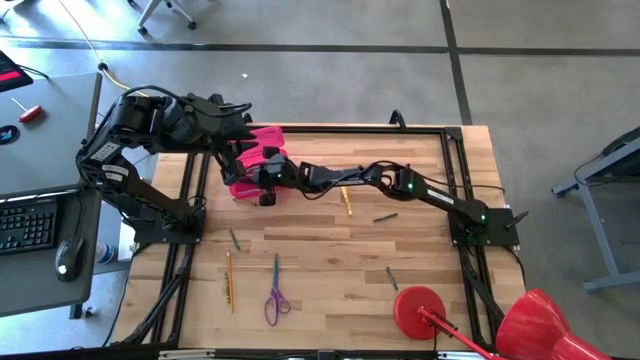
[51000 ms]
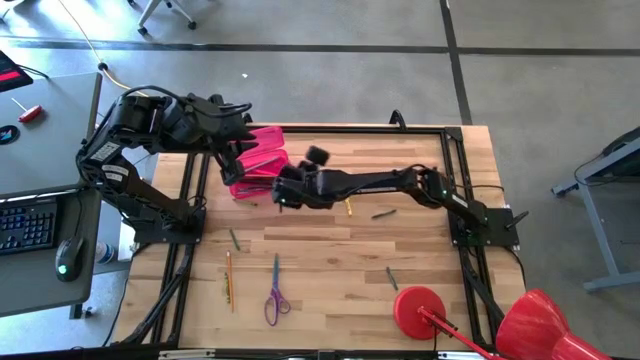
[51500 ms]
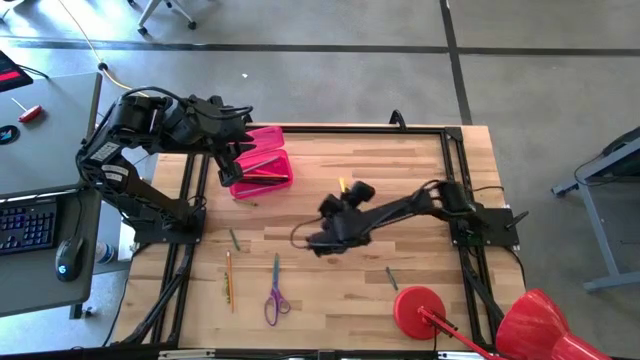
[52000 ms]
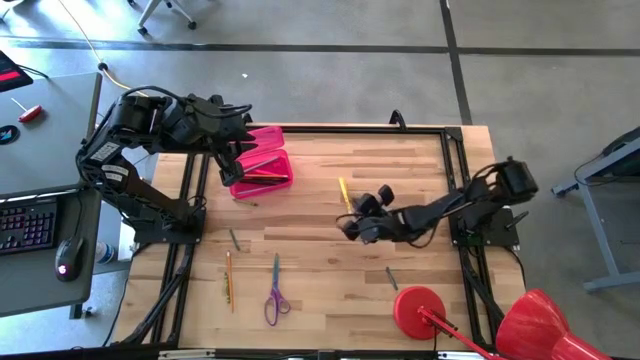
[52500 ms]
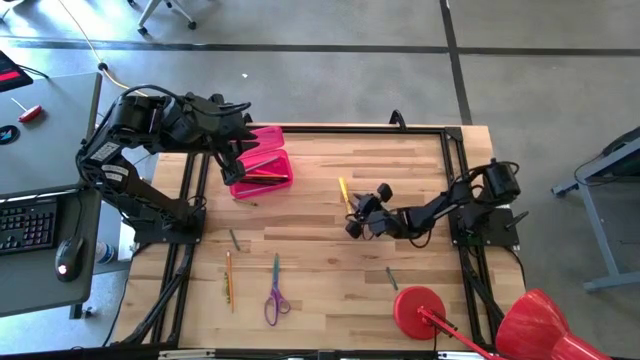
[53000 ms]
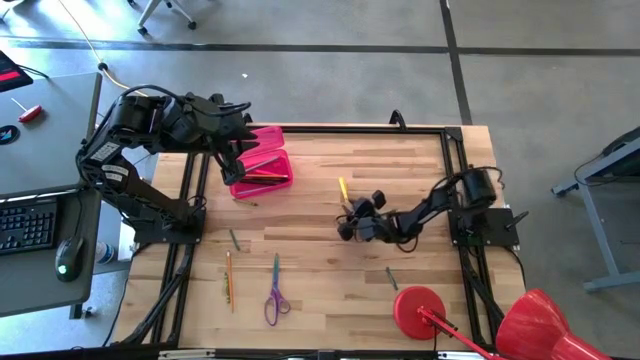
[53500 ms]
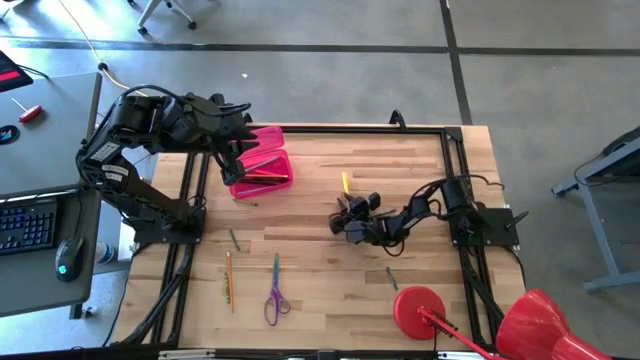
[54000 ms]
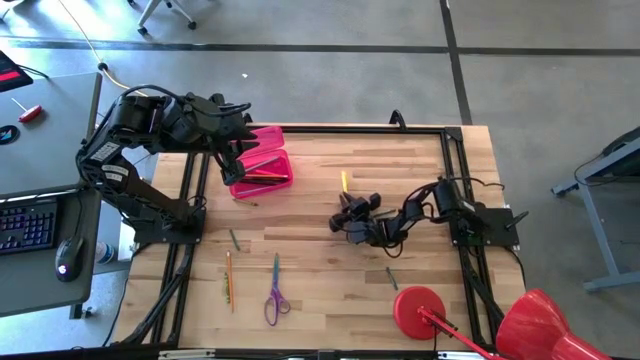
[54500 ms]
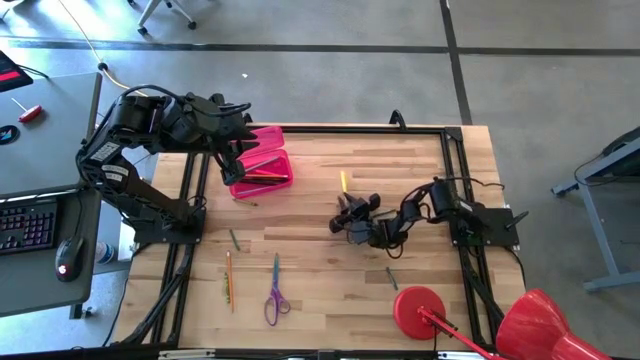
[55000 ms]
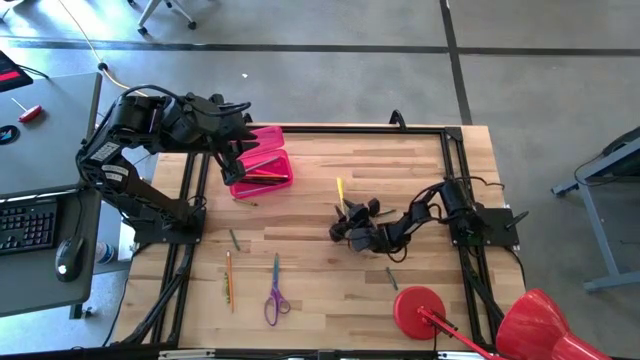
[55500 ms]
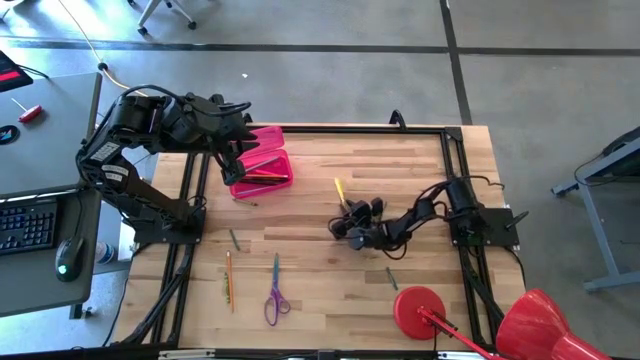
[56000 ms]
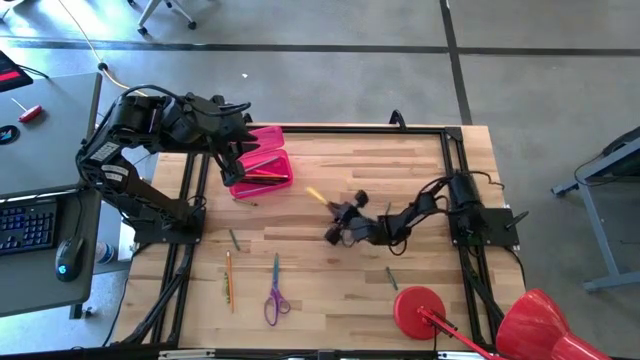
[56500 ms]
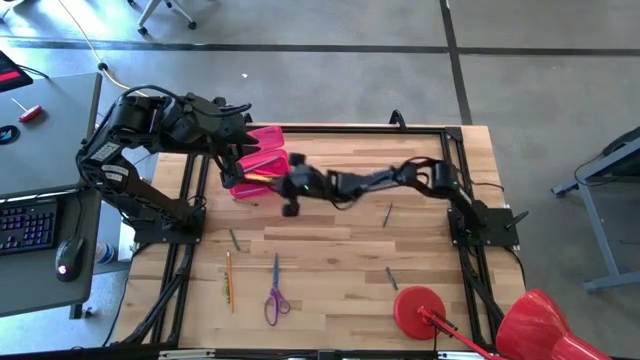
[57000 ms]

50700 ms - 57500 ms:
Task: Pick & place school supplies into a supply box
Put the yellow pen into the supply box

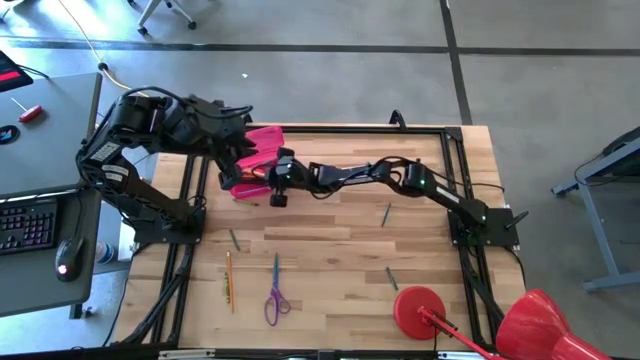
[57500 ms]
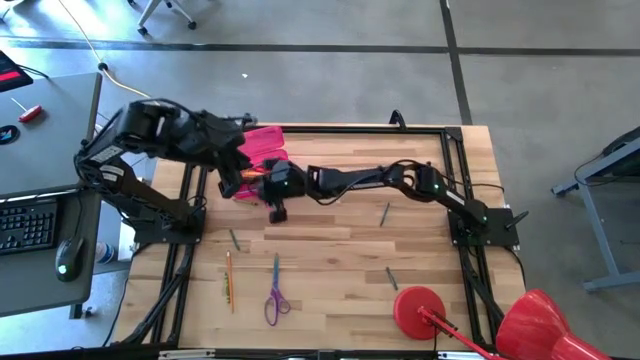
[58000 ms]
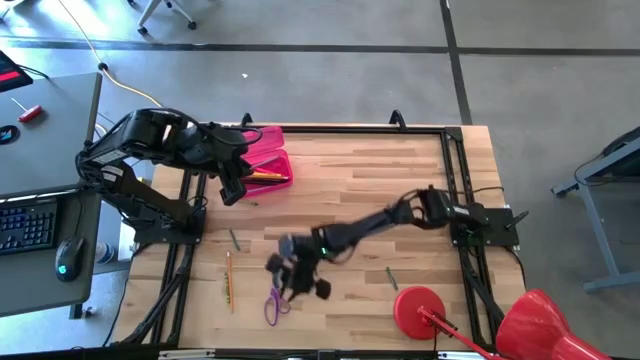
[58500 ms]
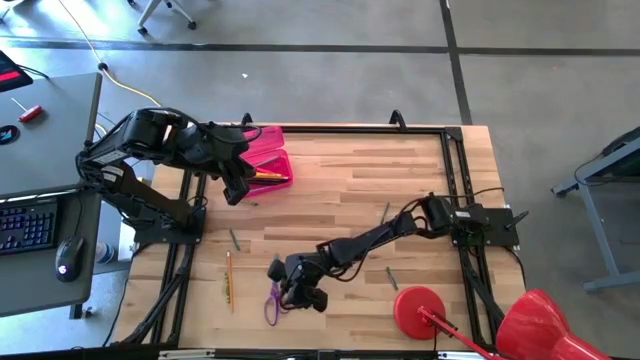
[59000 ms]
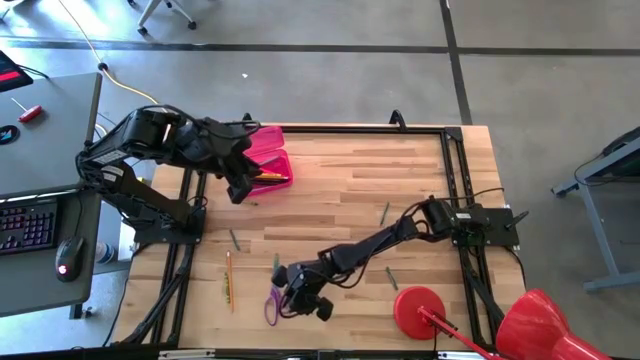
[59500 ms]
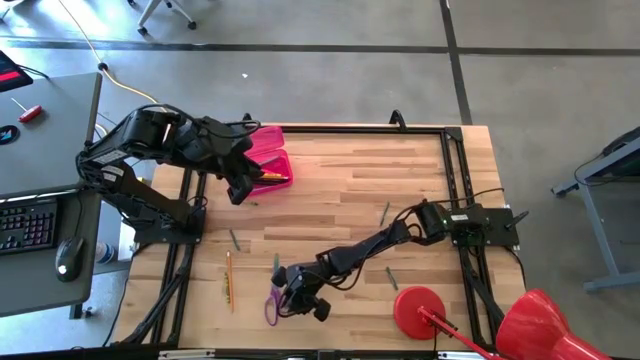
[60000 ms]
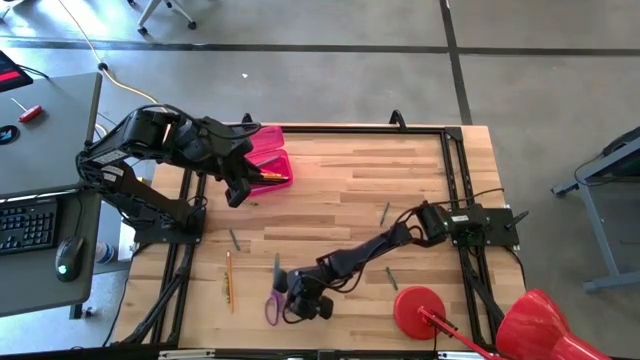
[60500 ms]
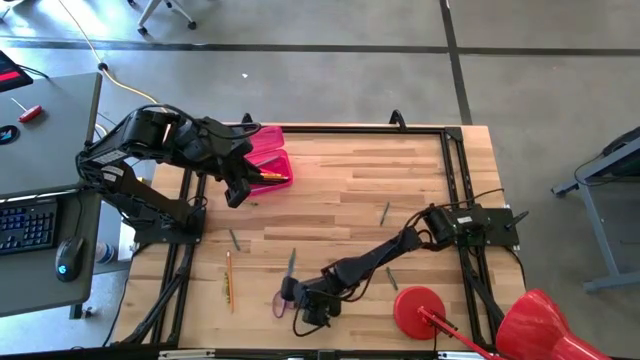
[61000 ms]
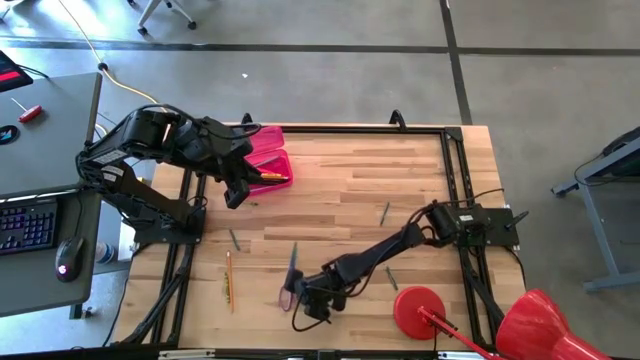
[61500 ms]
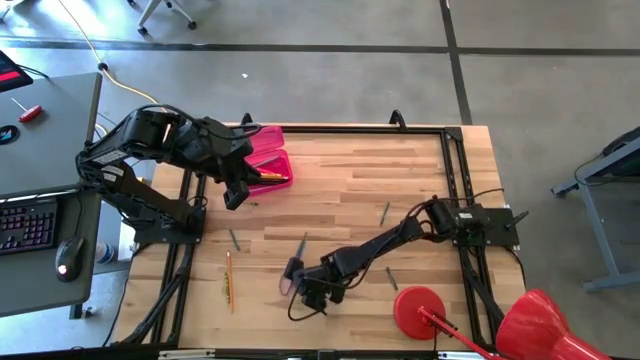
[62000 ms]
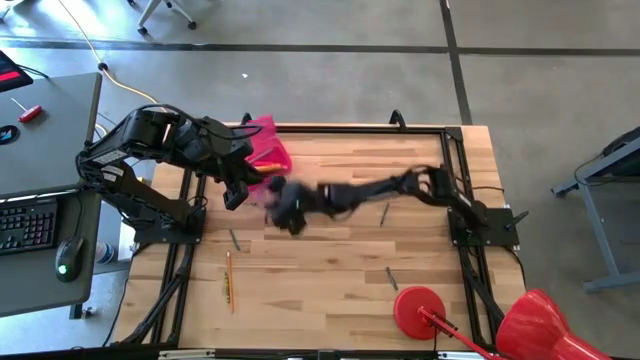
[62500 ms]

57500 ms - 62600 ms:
Put the scissors into the supply box

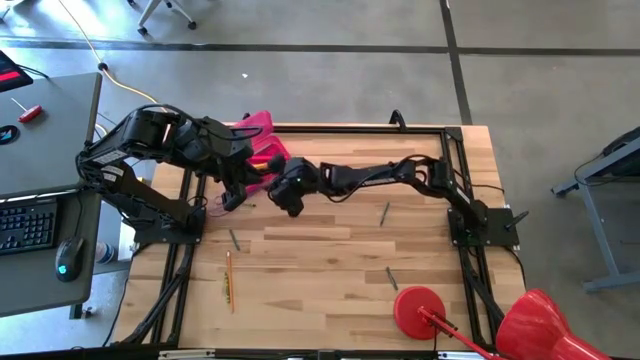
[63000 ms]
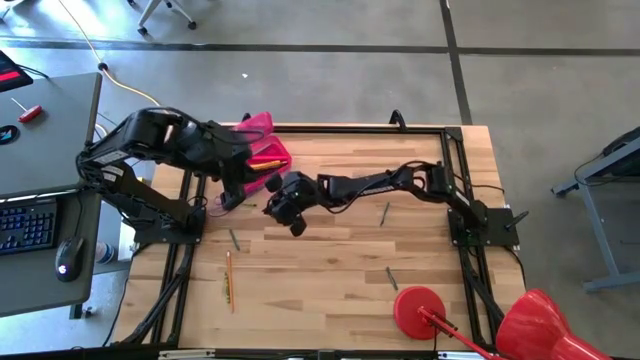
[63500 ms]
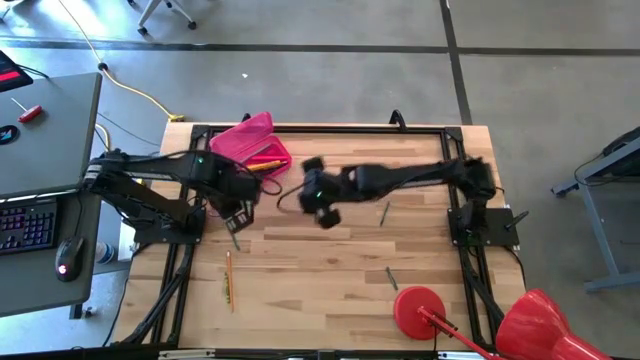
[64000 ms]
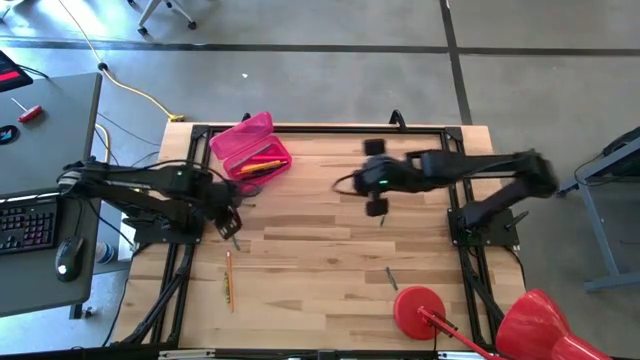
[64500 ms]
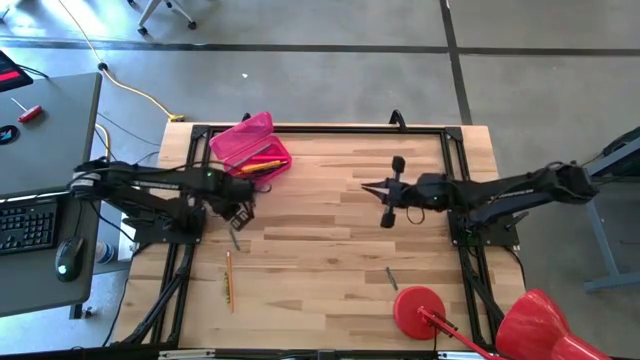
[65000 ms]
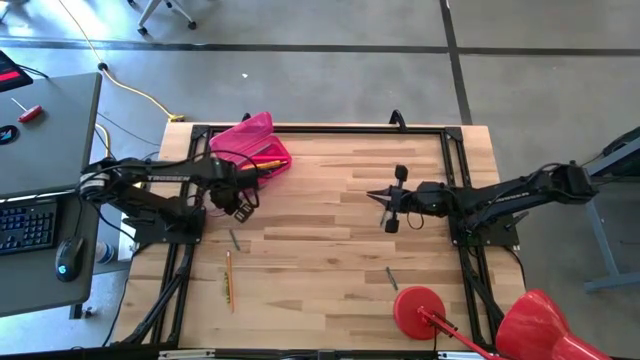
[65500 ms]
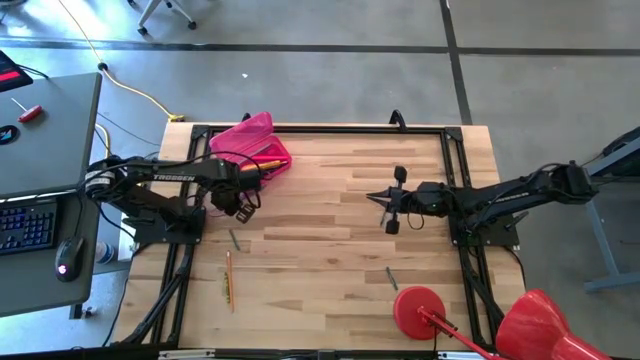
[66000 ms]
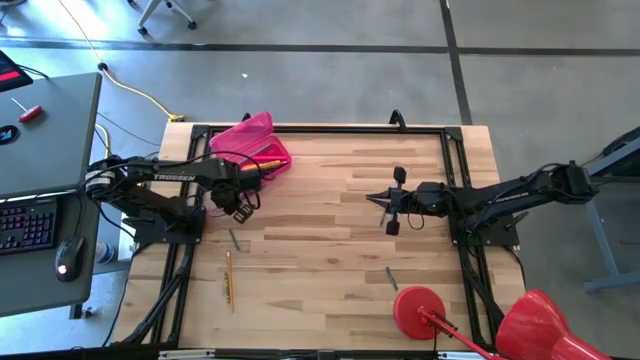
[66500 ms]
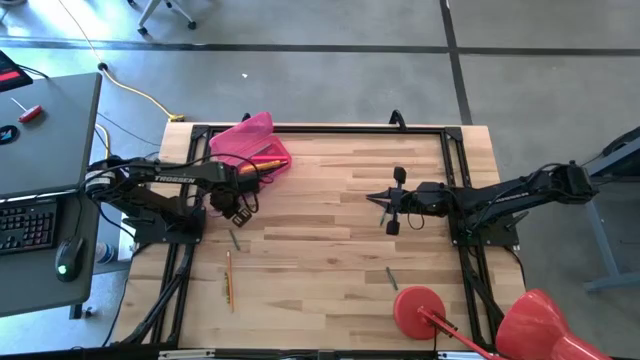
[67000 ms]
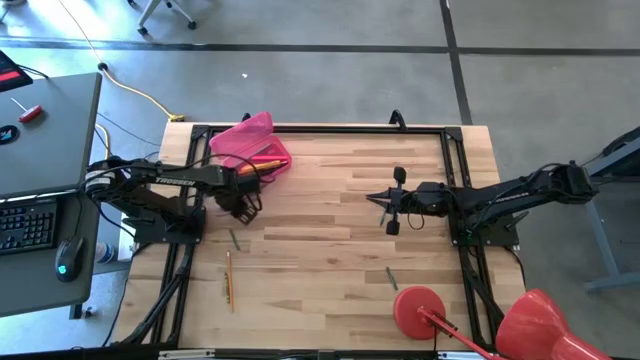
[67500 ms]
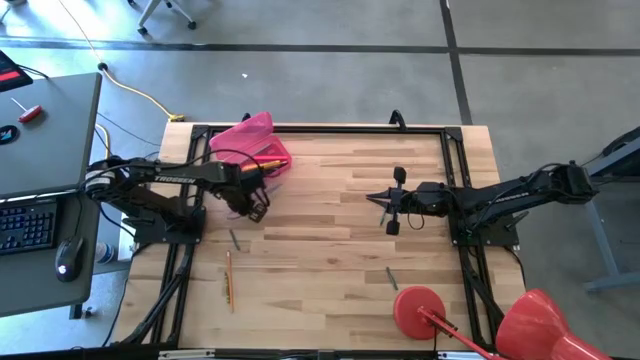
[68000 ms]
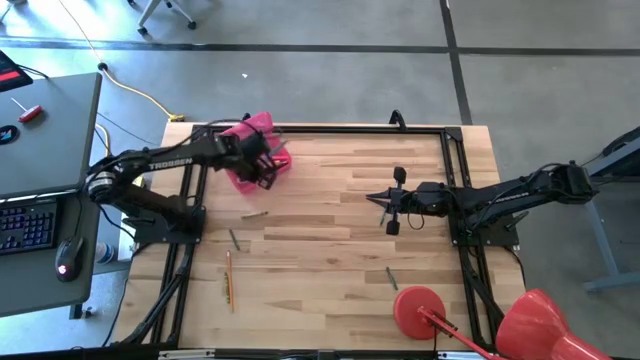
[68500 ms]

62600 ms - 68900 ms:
Put the scissors into the supply box

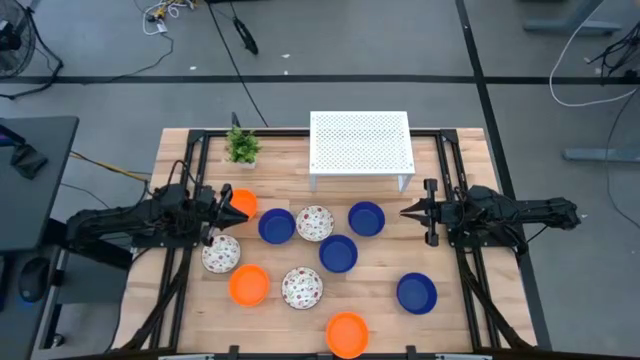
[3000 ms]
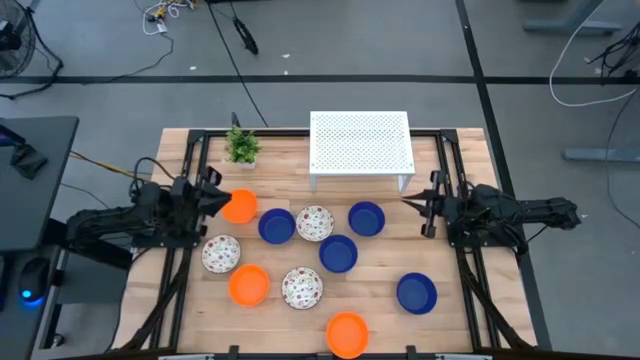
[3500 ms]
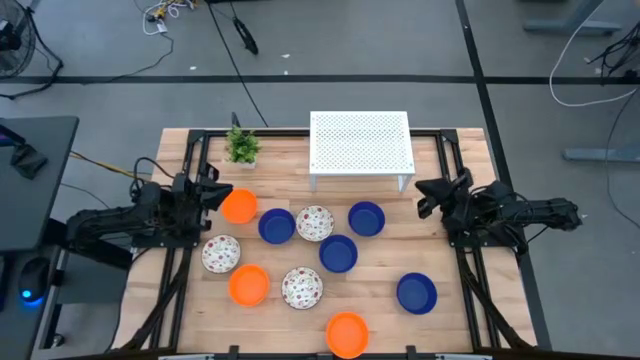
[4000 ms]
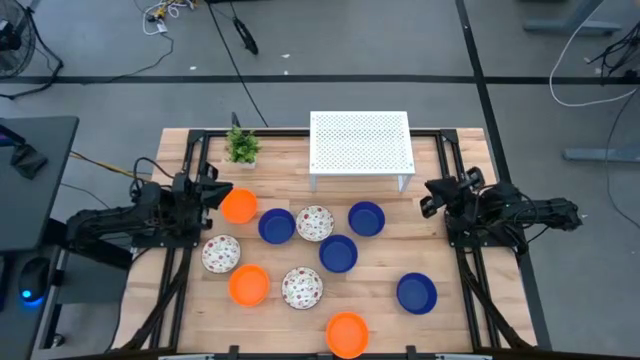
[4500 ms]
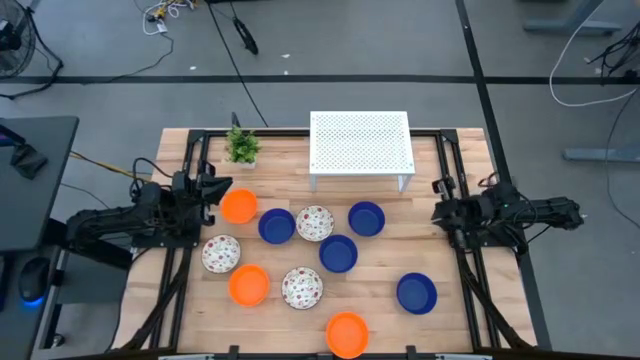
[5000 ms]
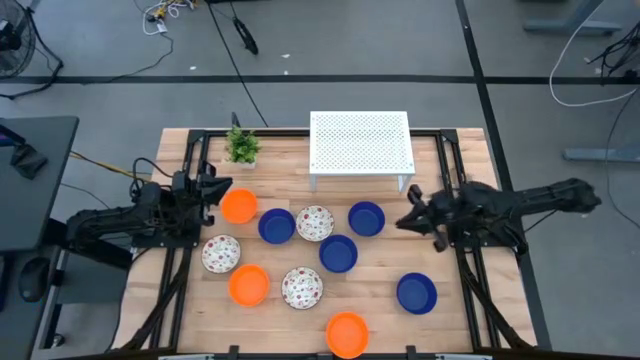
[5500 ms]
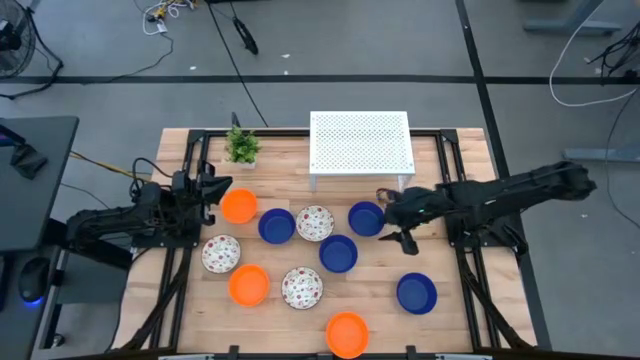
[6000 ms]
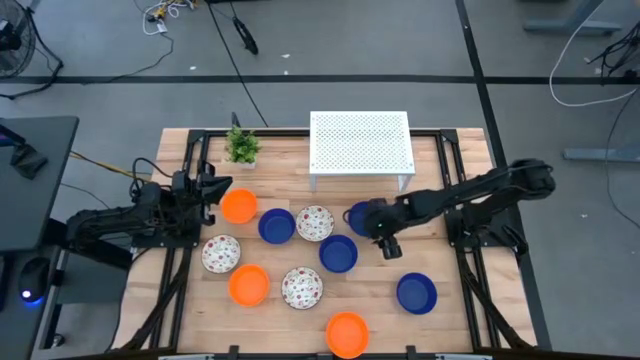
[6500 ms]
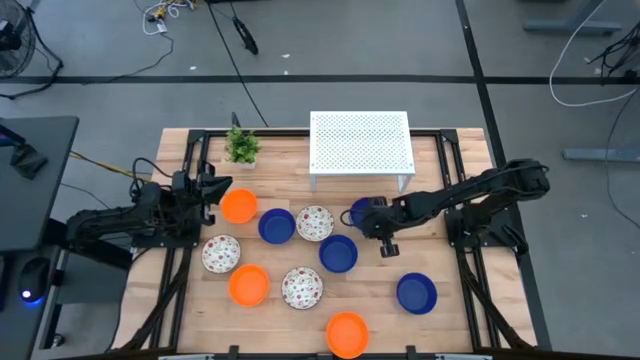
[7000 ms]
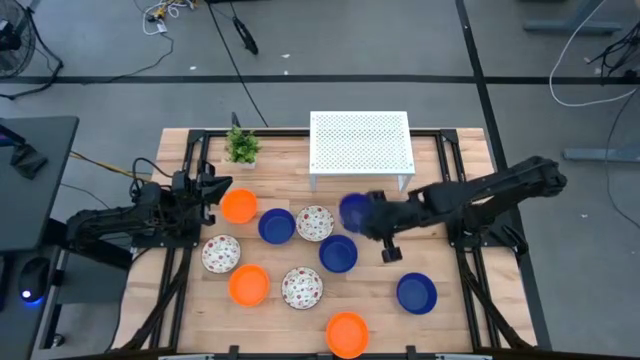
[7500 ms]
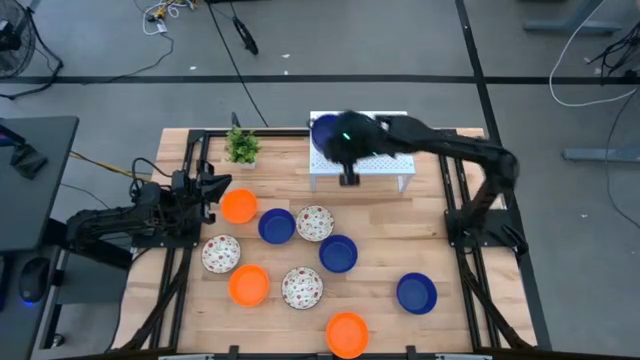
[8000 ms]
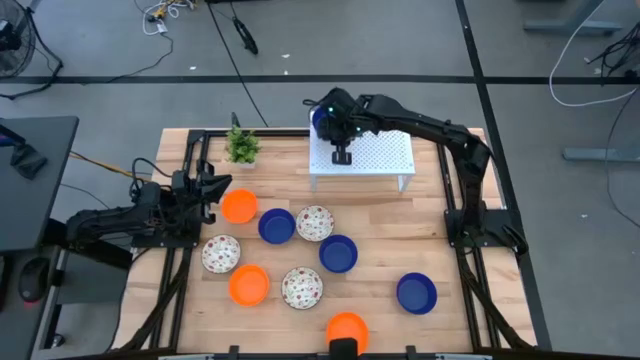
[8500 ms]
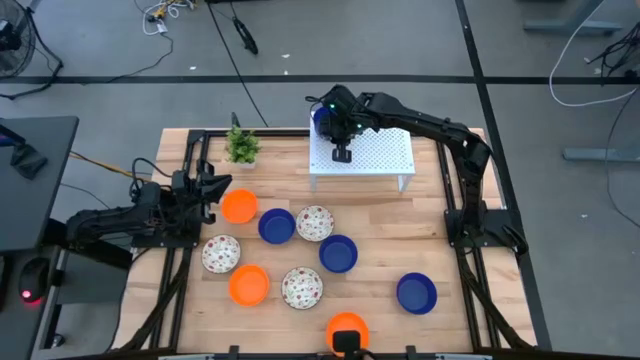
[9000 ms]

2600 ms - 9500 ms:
Task: Pick & Place Mini bowls
Put the blue bowl on the shelf
